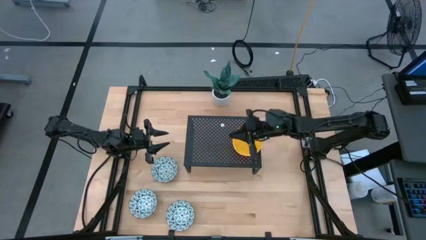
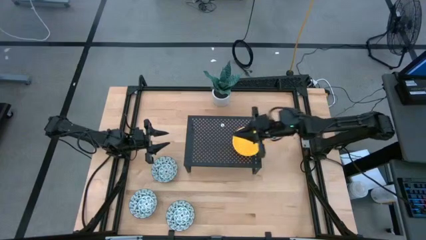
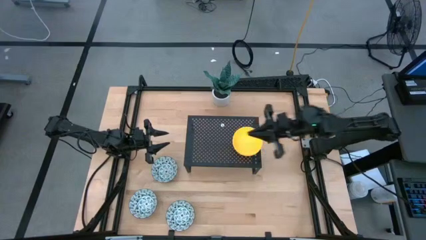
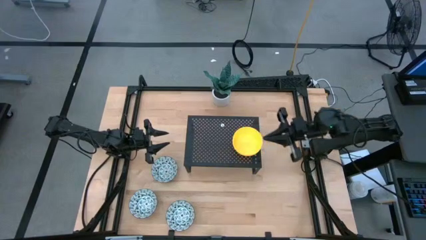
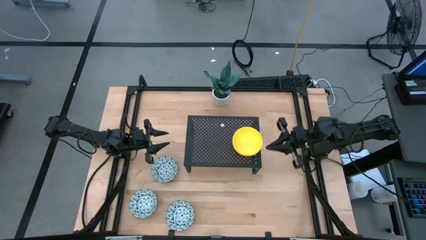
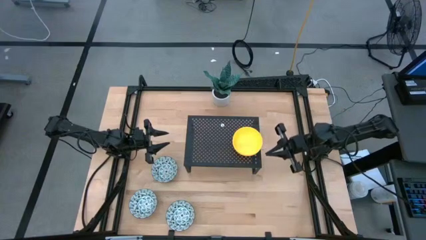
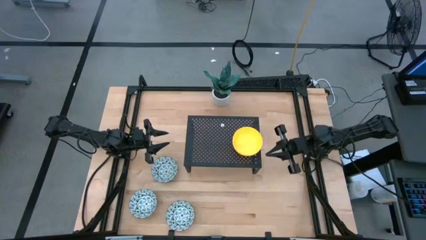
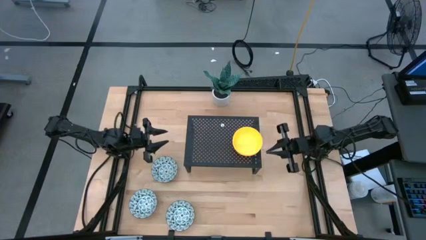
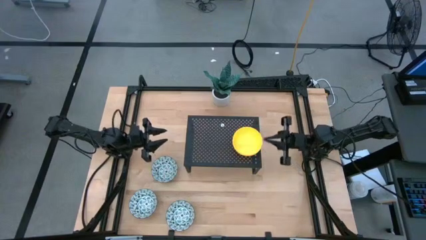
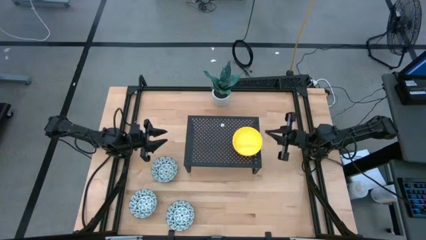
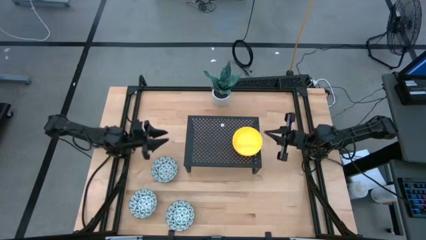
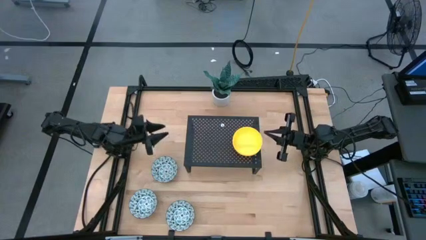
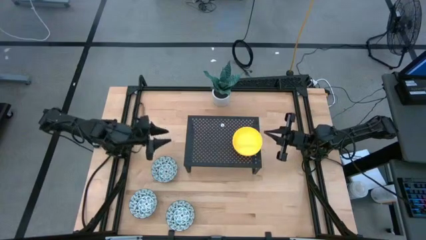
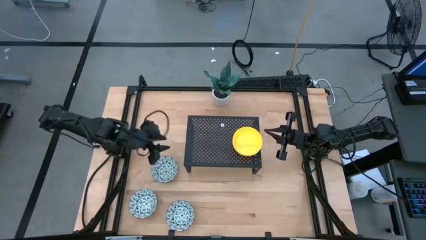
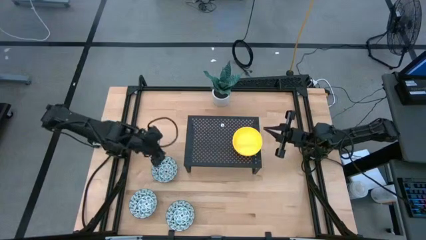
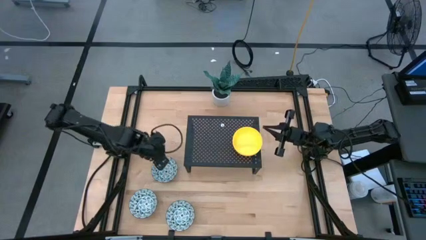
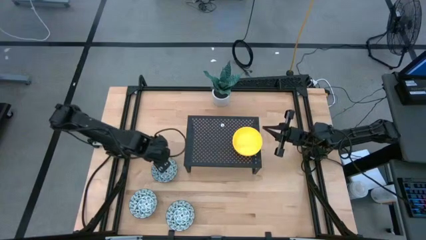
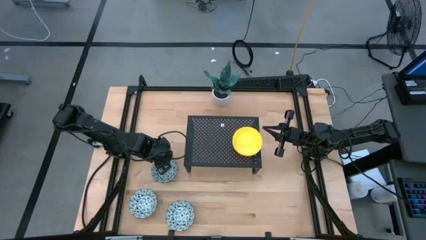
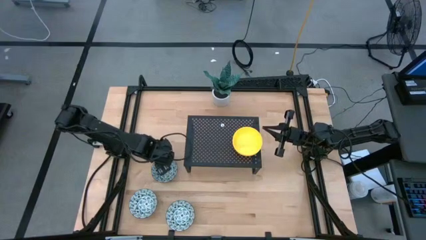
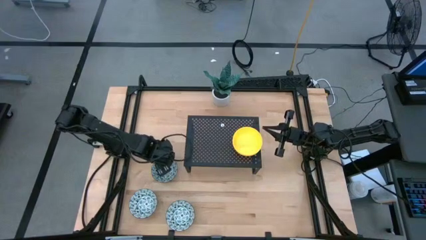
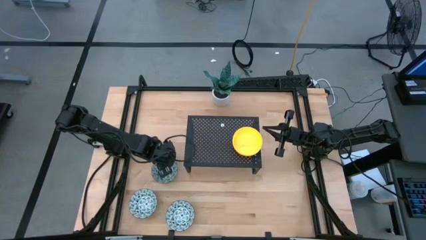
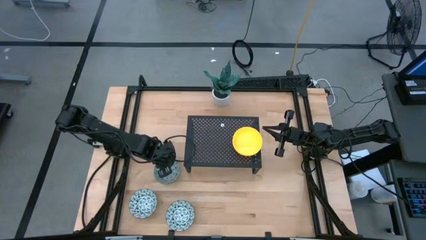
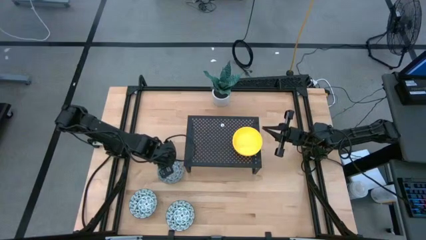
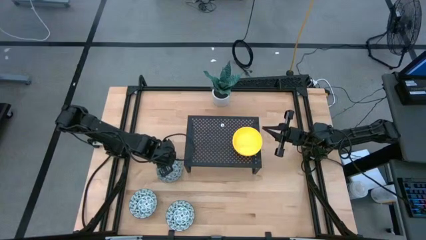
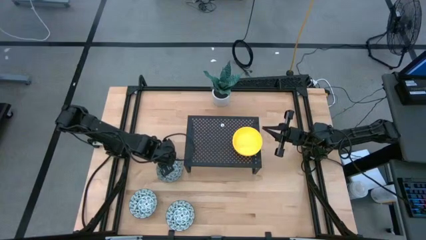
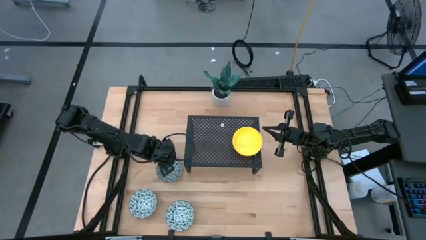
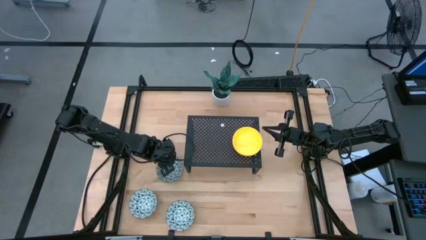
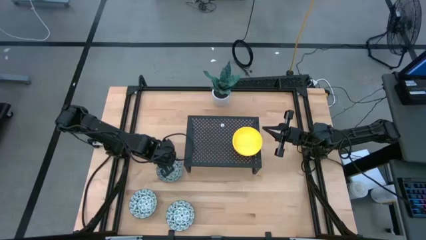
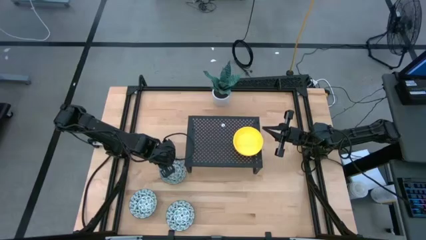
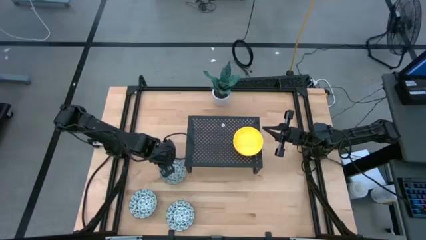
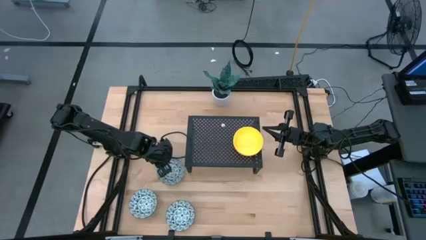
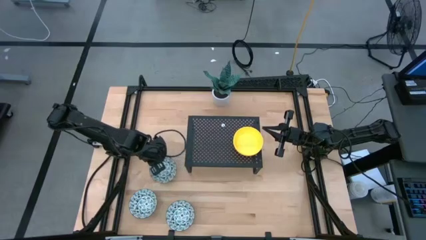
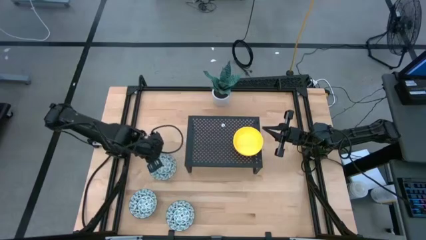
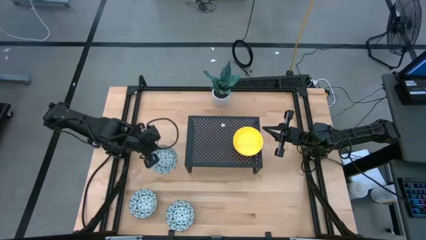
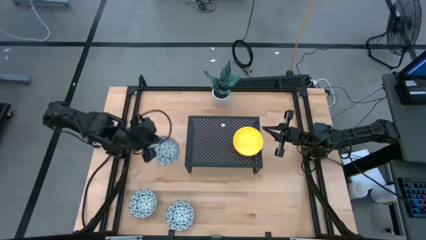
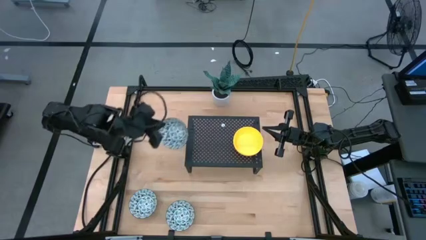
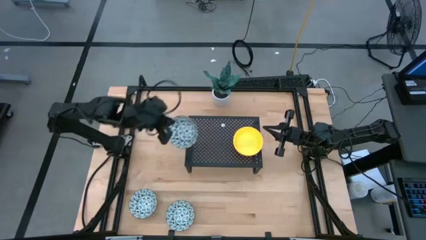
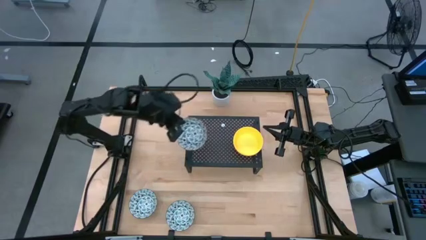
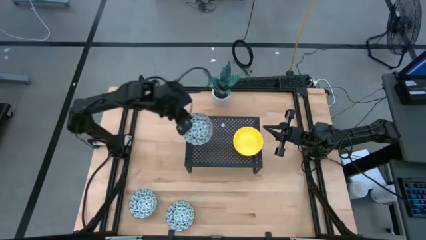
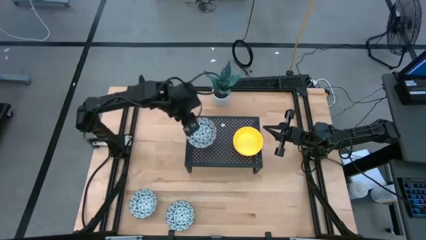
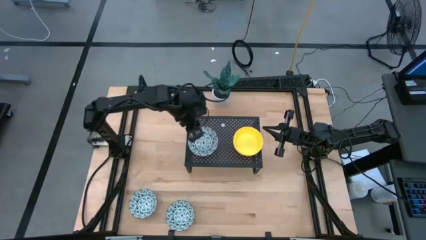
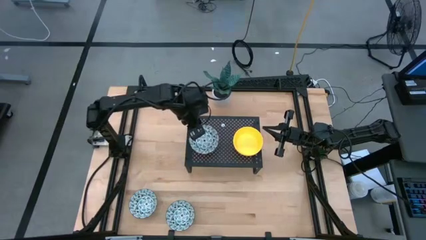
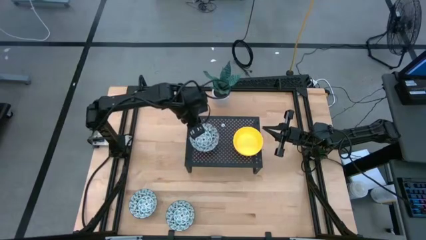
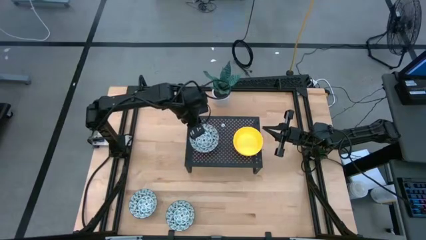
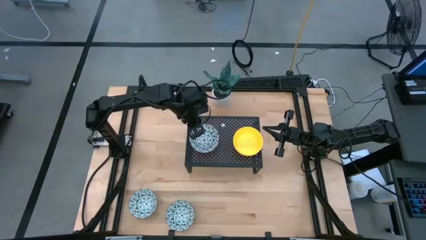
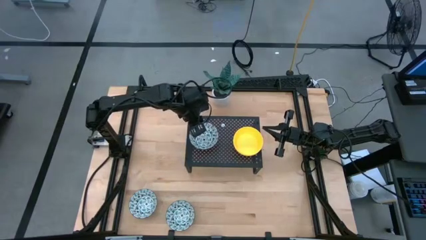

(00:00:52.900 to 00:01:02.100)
Task: Pick & Place Mini bowls
Put the top blue patterned bowl on the shelf

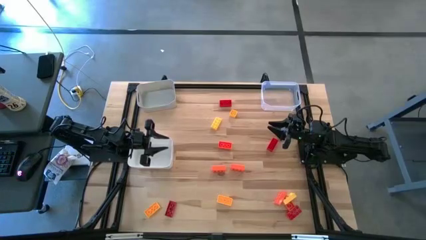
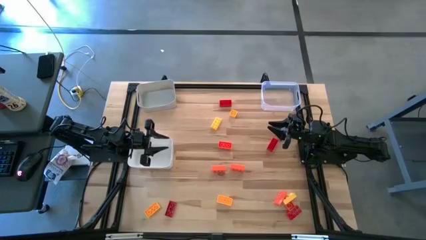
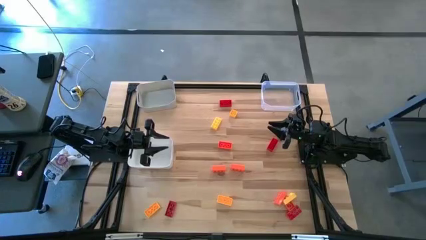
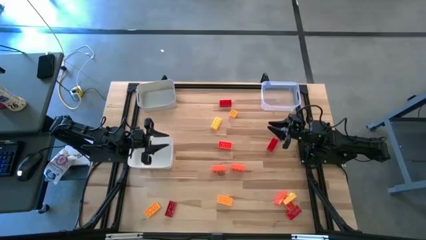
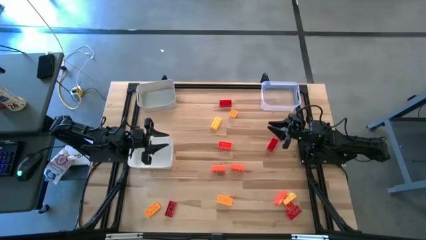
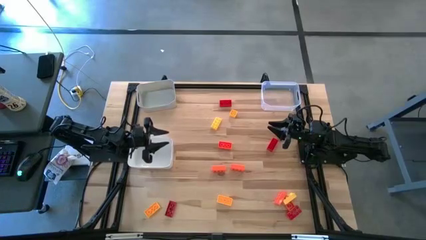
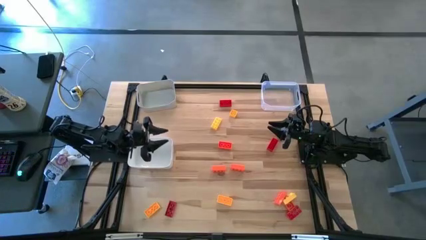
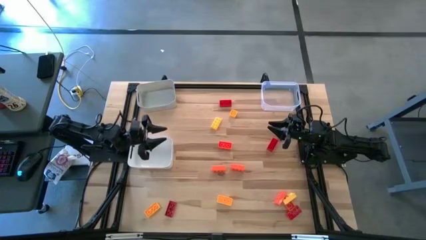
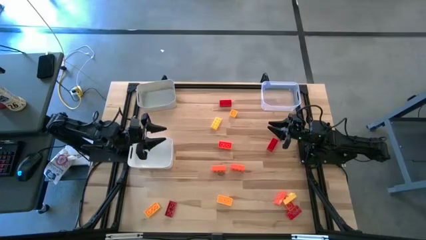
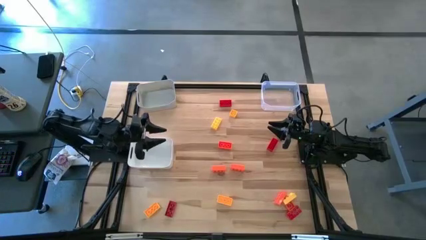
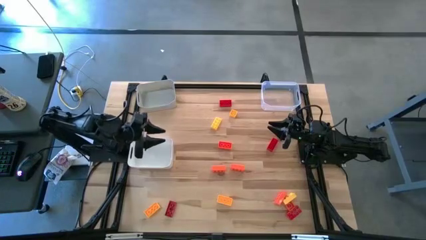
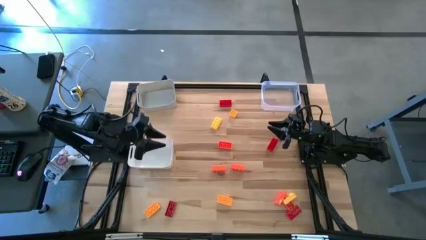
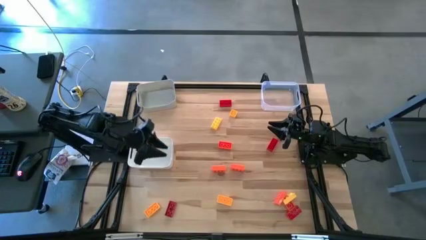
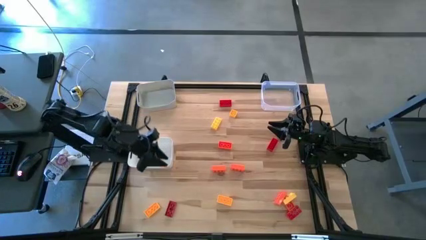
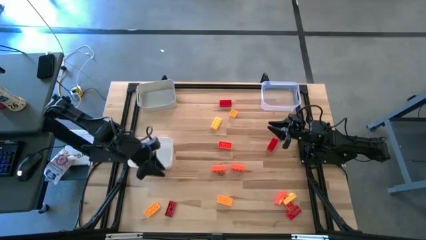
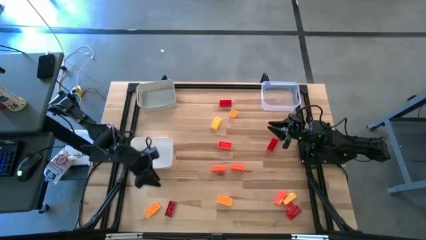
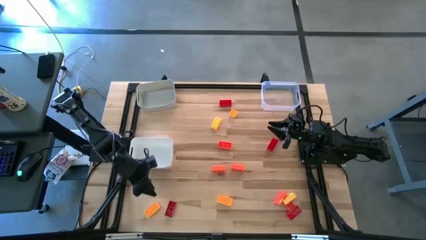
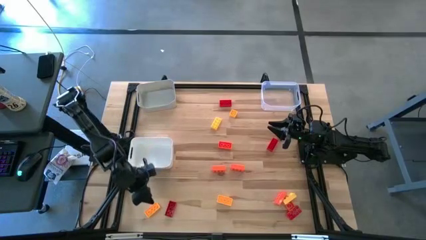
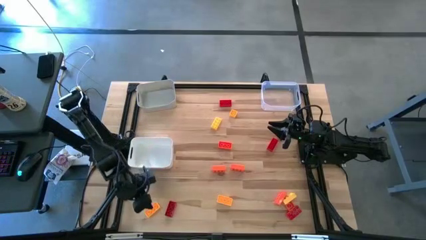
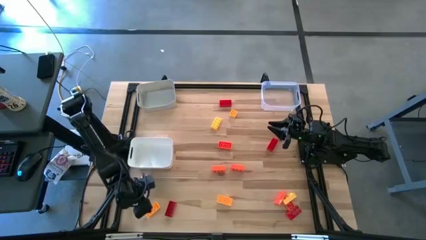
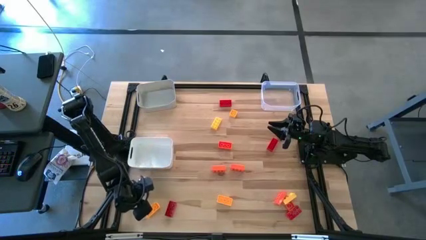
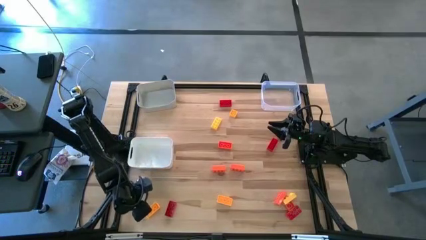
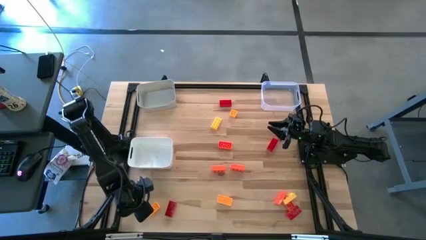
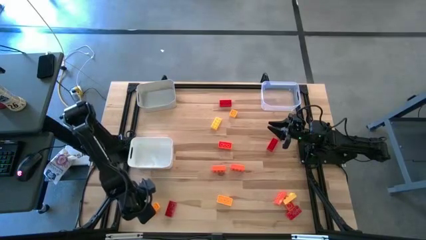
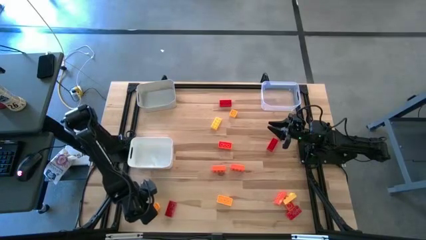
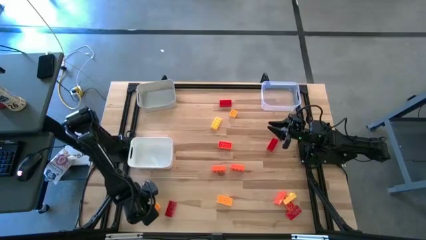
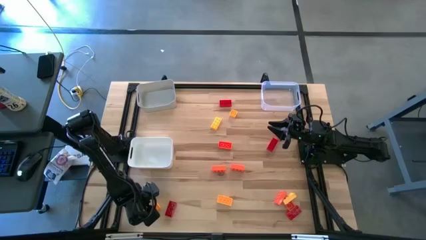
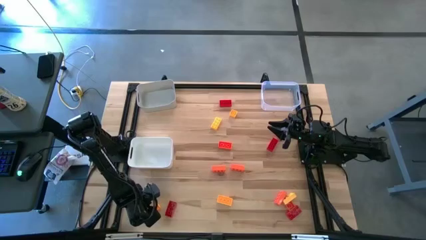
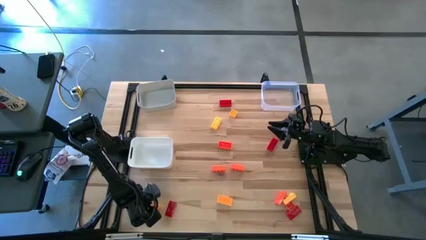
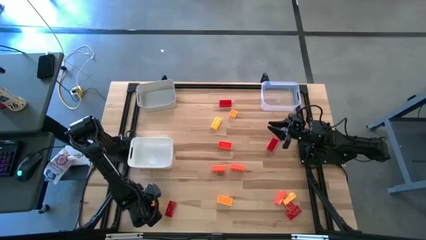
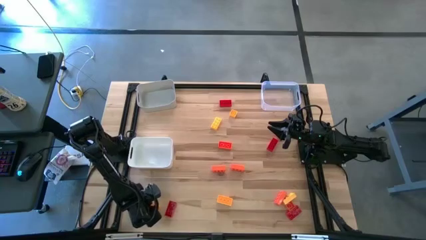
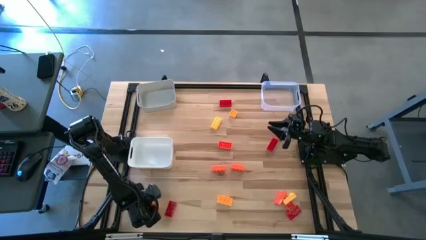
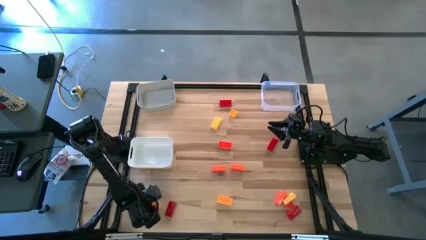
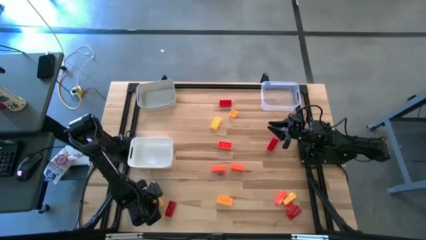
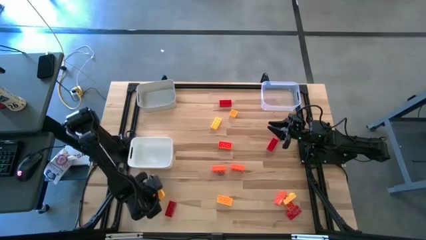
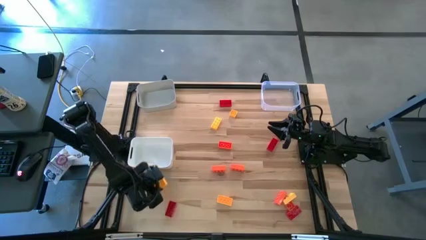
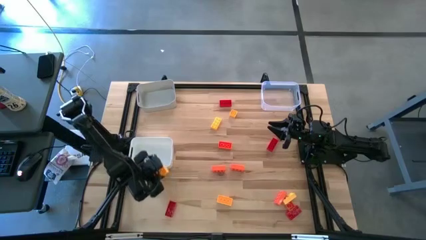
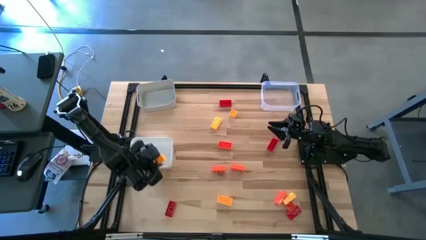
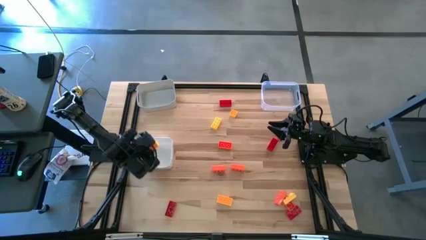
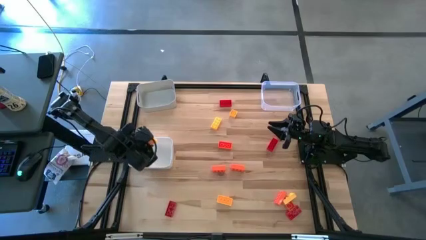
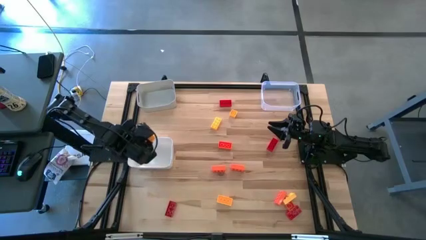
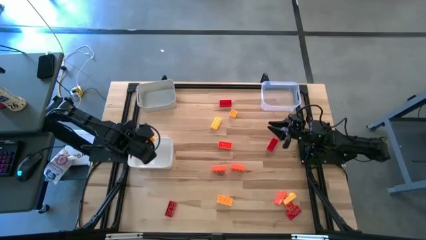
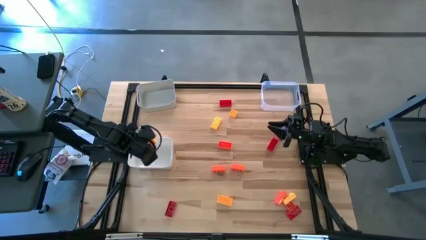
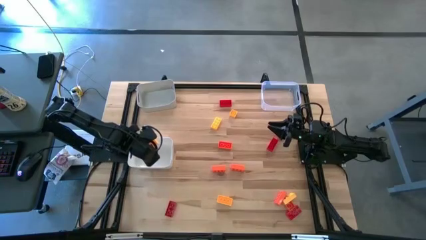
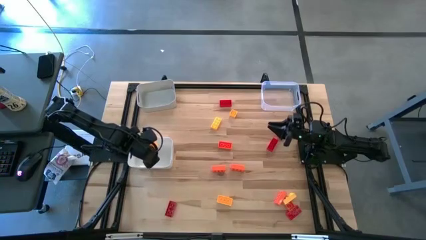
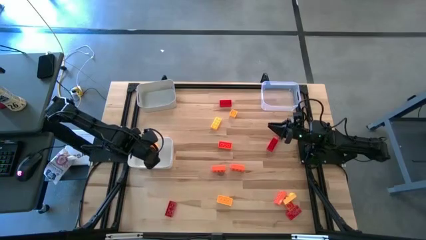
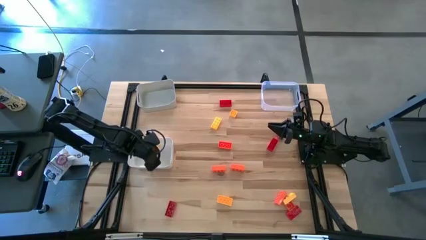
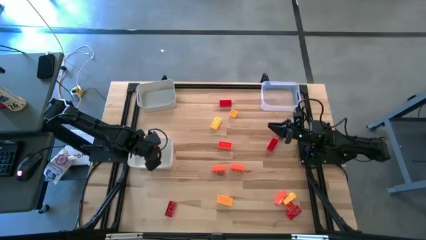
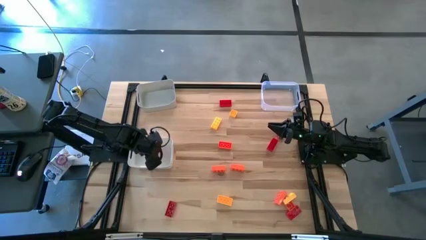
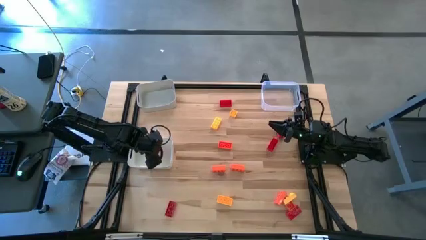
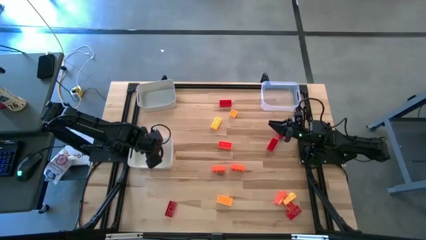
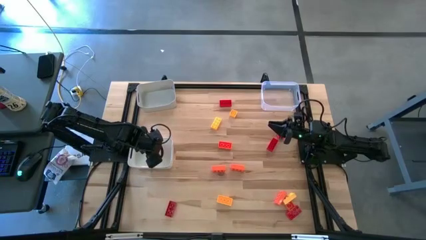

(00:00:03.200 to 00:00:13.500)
Task: Sort & place blocks by color
Put the yellow game piece into the white bin
